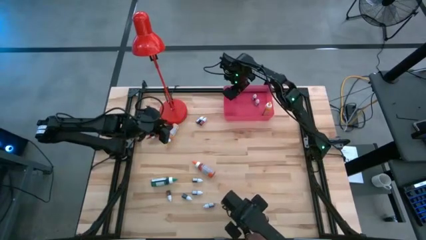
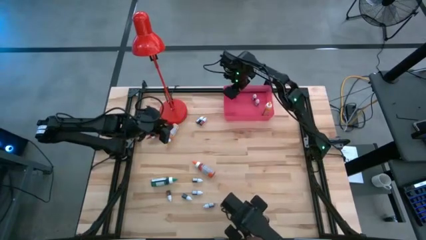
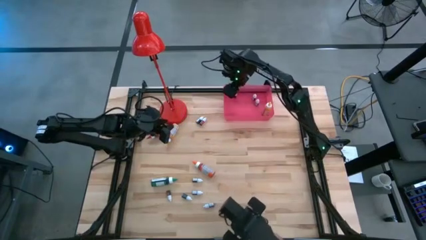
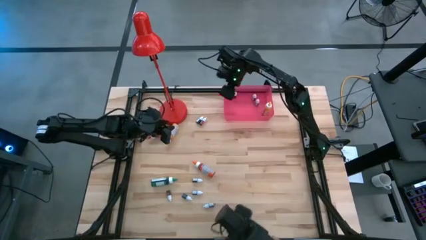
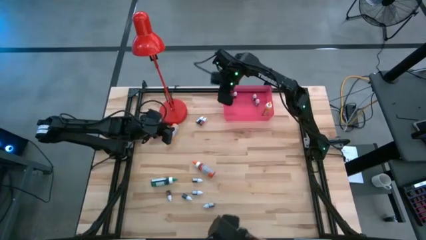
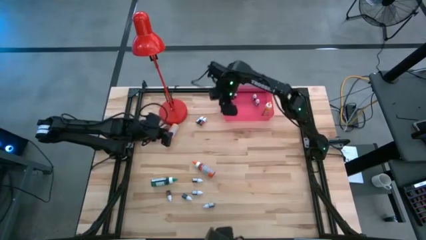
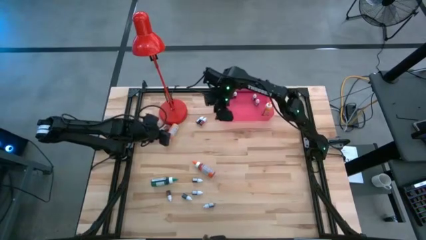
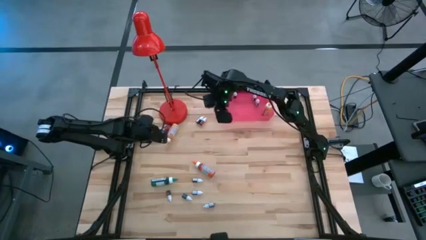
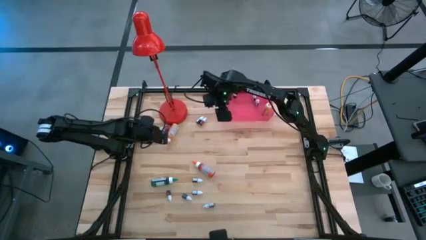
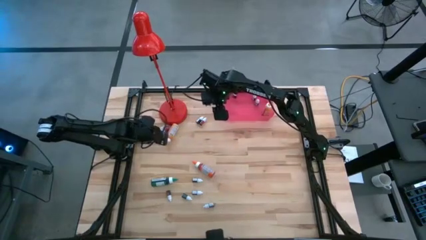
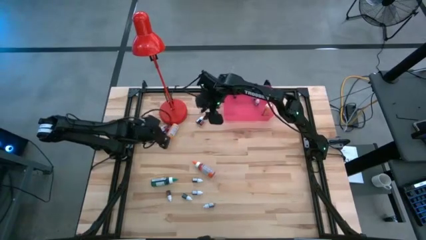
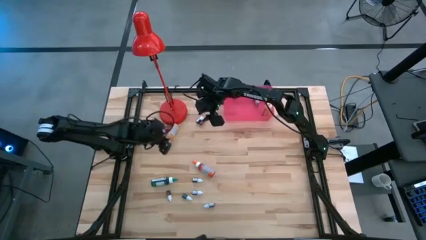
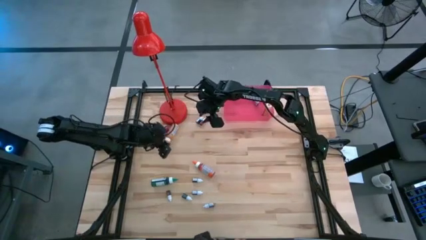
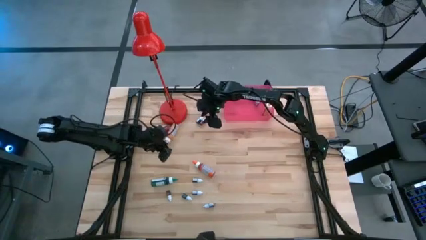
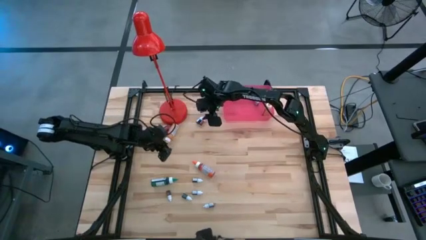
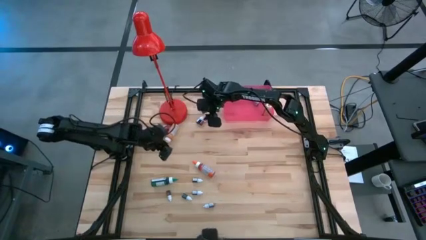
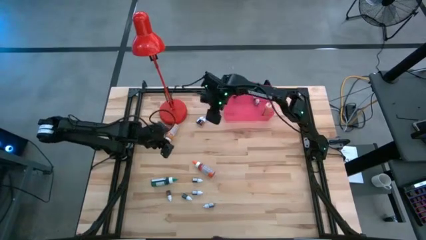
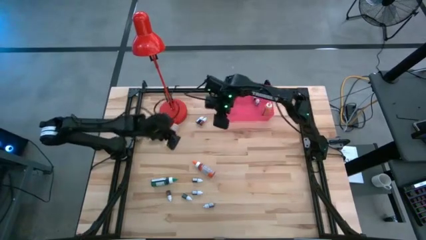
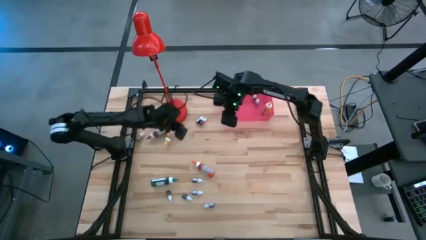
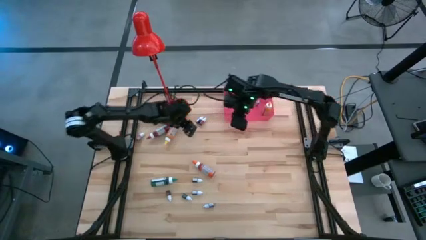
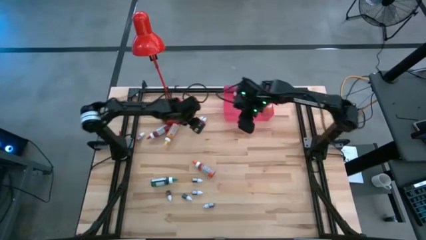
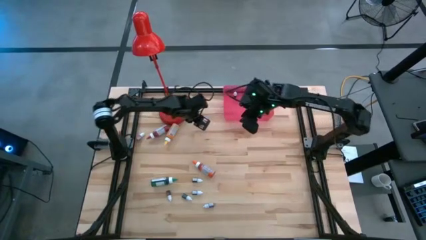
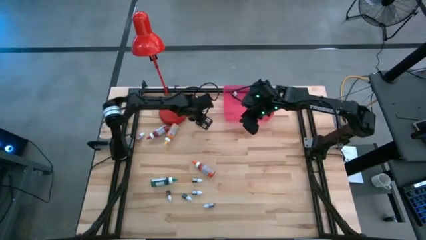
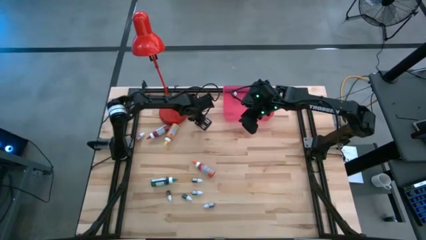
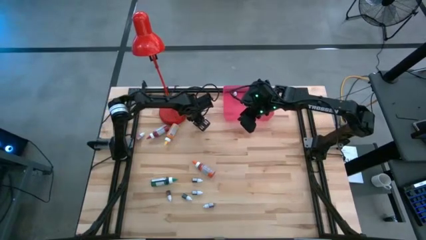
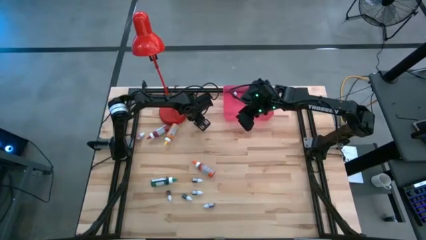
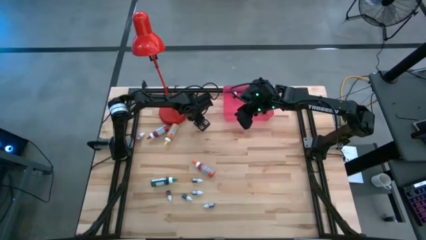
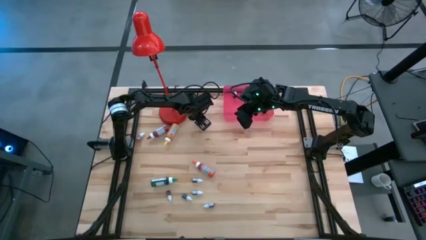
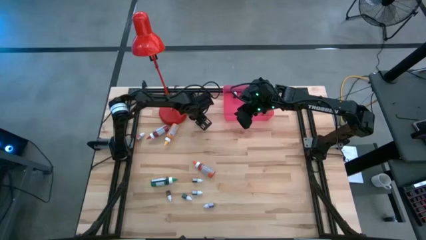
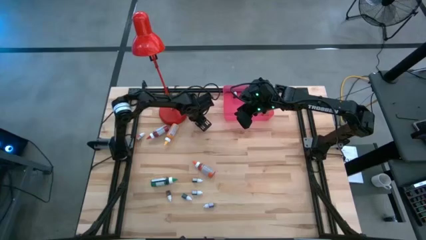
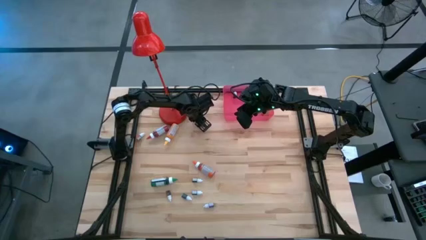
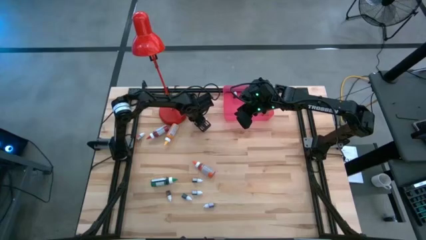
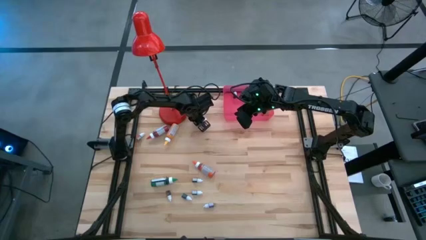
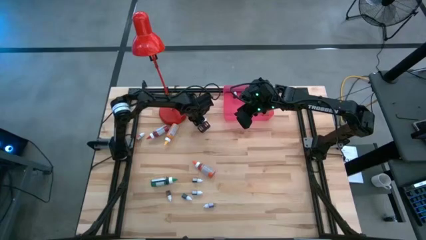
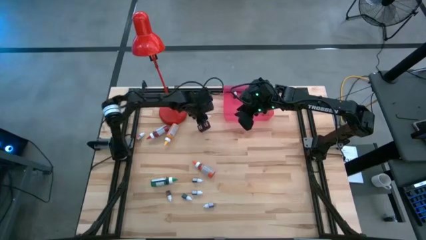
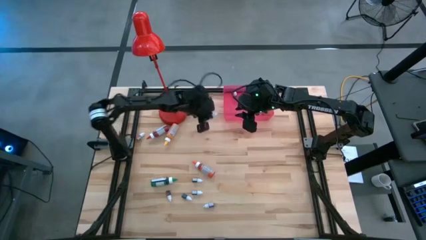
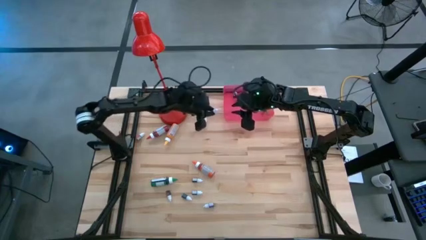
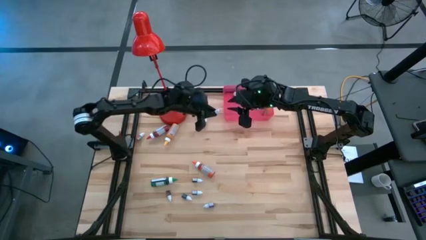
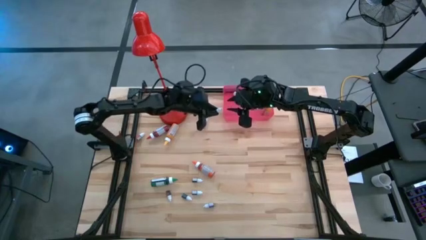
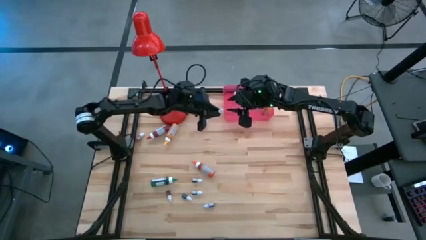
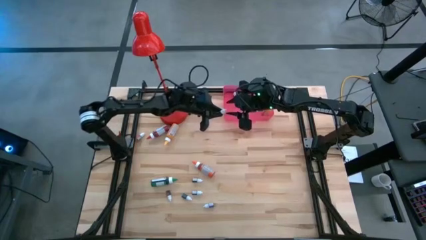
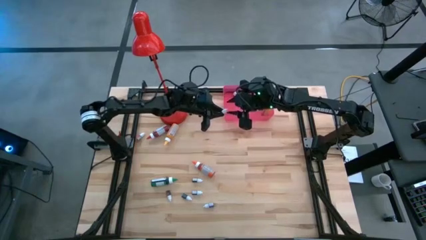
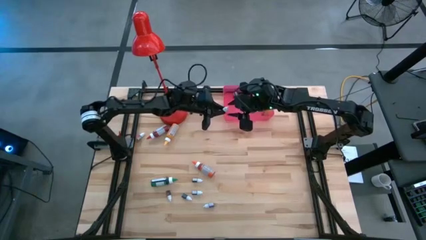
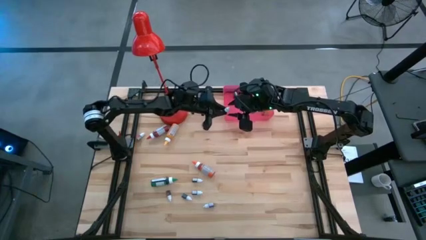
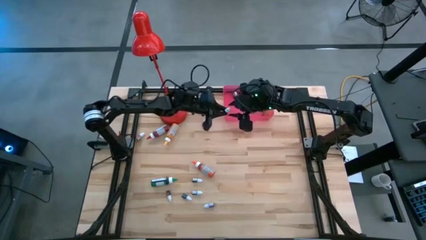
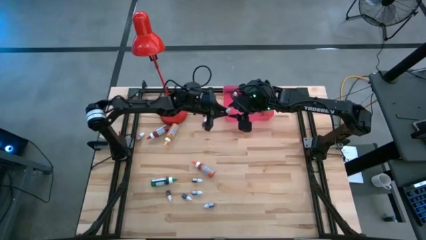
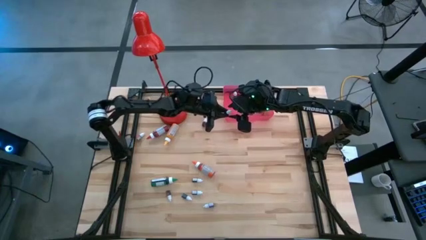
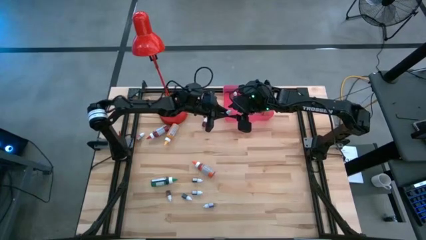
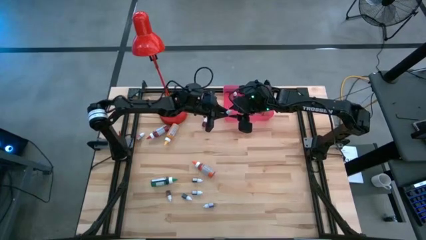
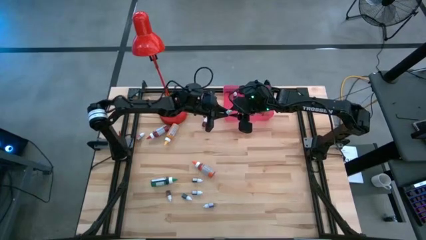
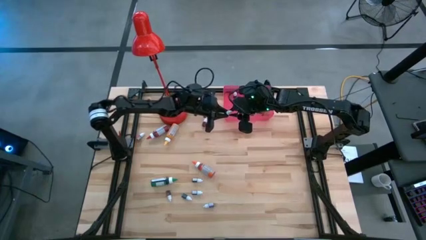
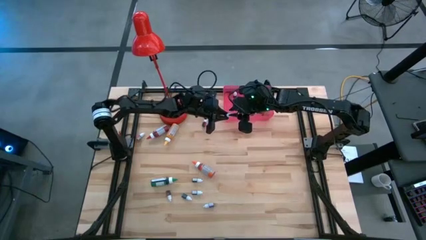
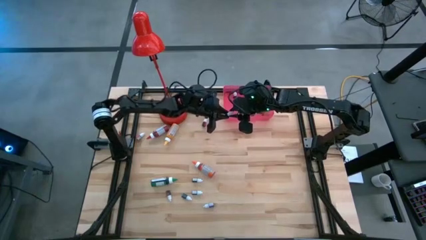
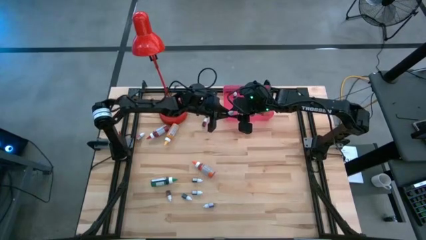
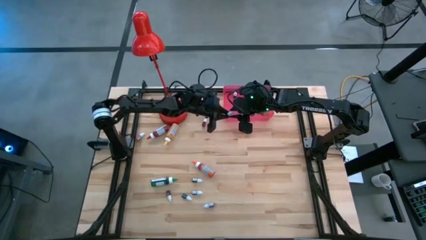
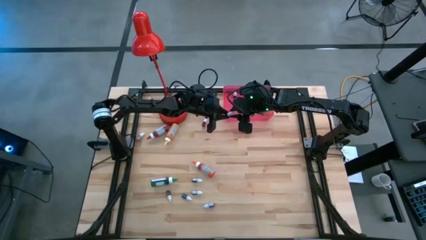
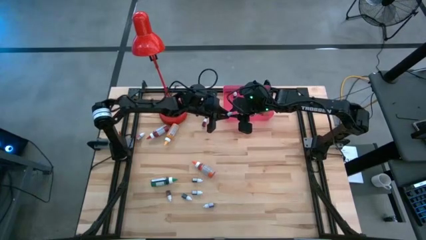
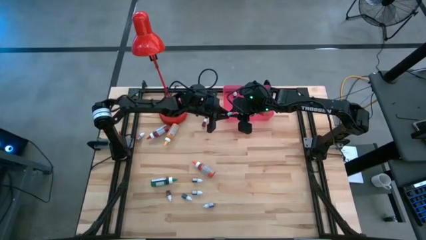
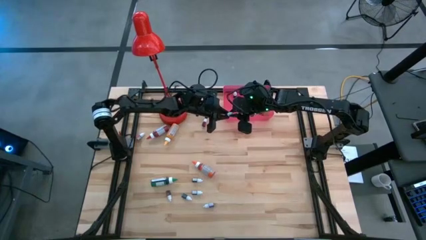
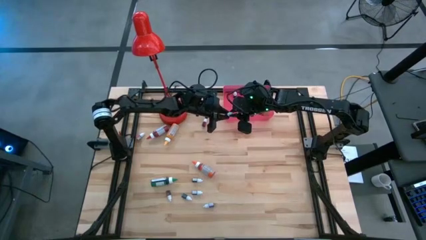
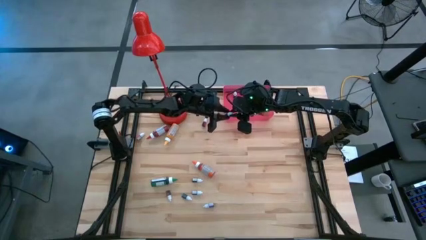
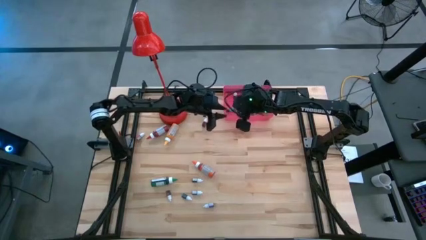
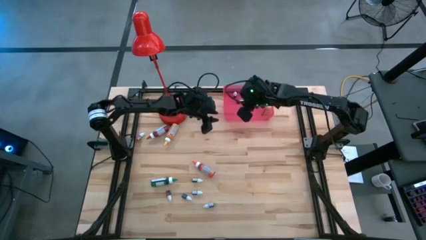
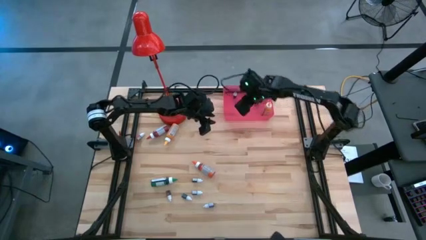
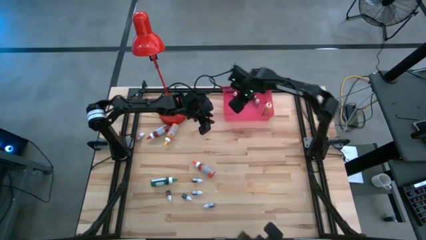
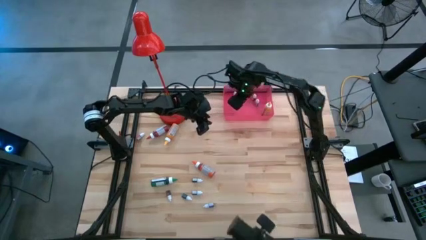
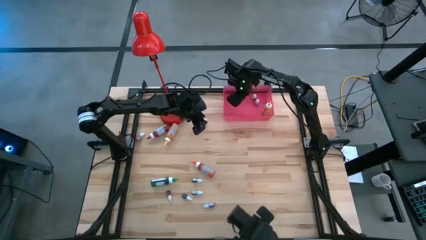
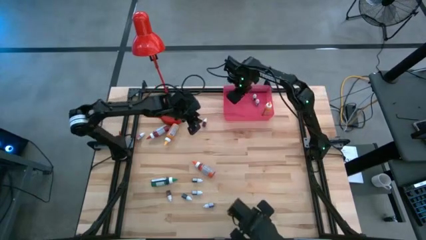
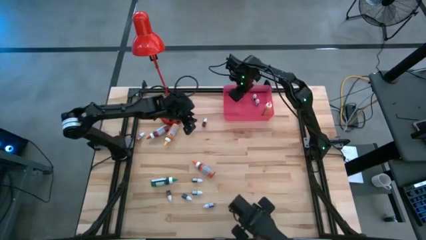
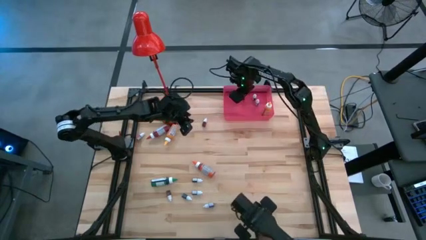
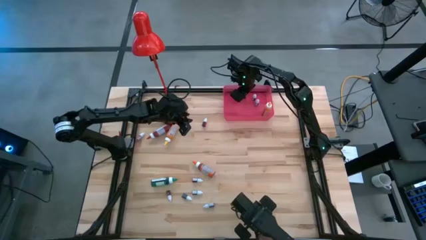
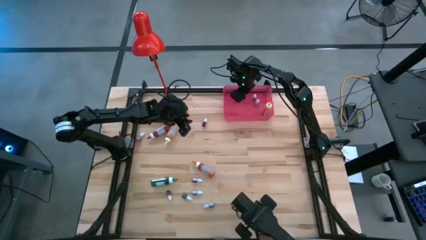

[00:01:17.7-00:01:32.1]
Task: Pick & Place food coloring
Put the small black food coloring bottle into the red bin
